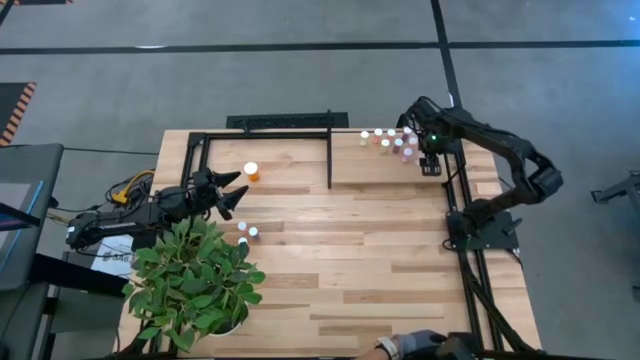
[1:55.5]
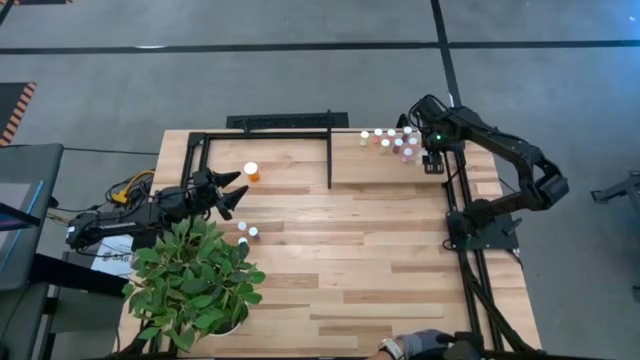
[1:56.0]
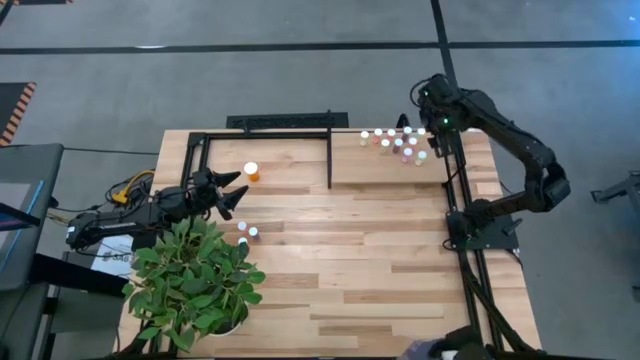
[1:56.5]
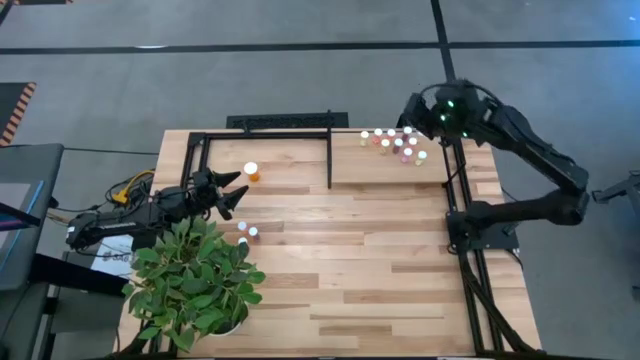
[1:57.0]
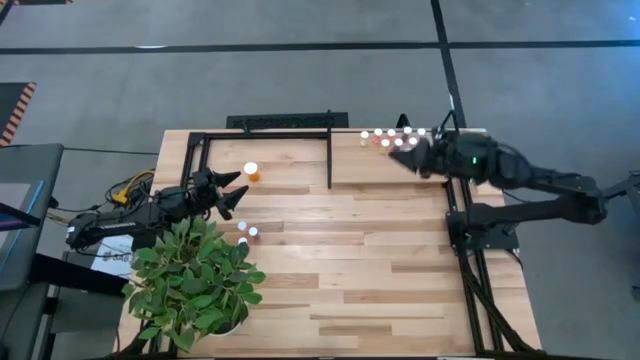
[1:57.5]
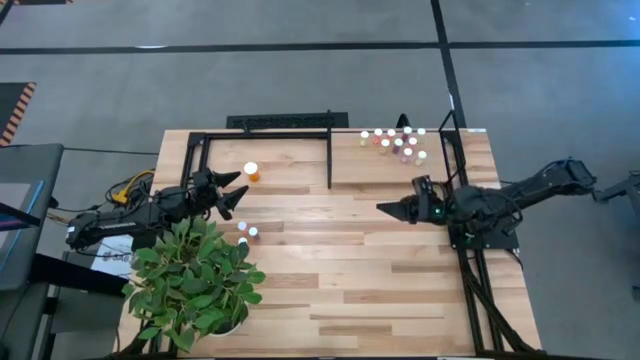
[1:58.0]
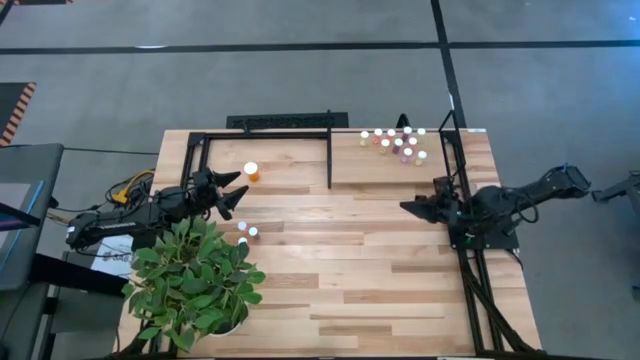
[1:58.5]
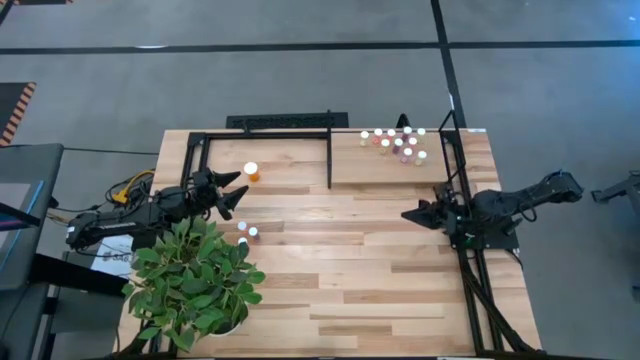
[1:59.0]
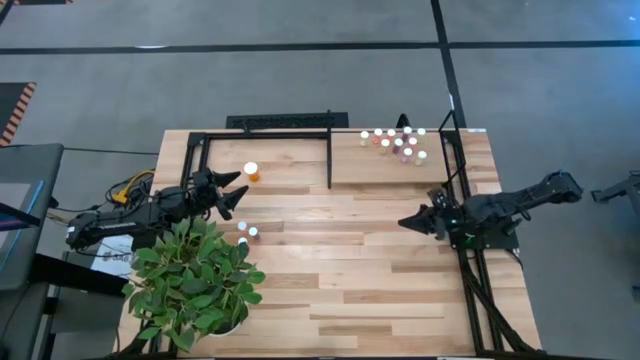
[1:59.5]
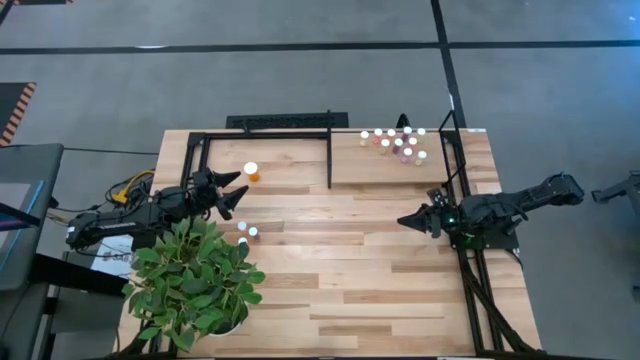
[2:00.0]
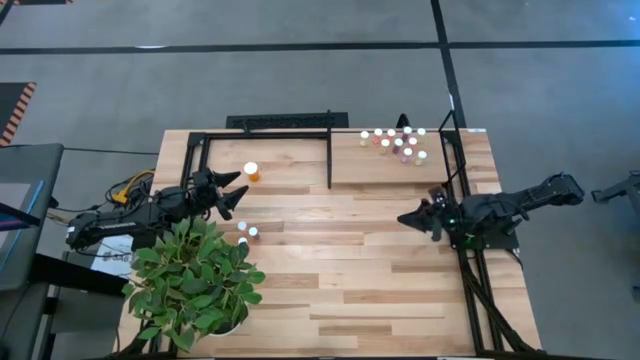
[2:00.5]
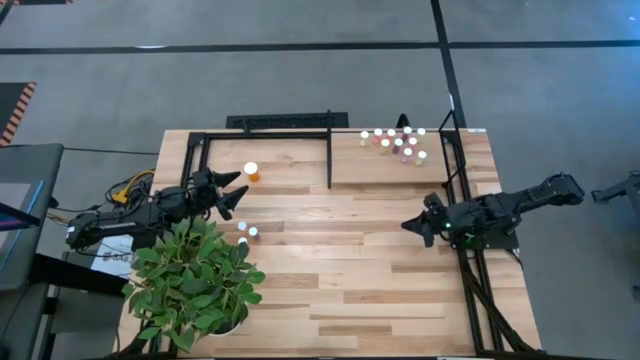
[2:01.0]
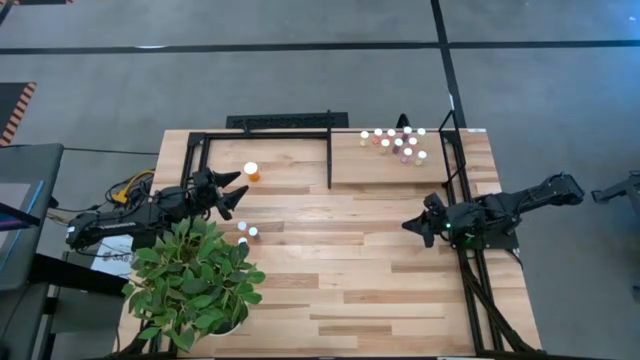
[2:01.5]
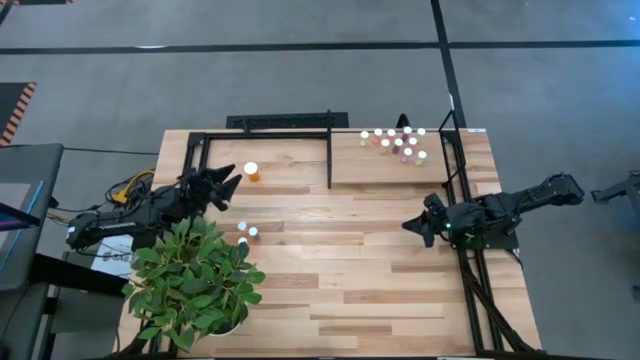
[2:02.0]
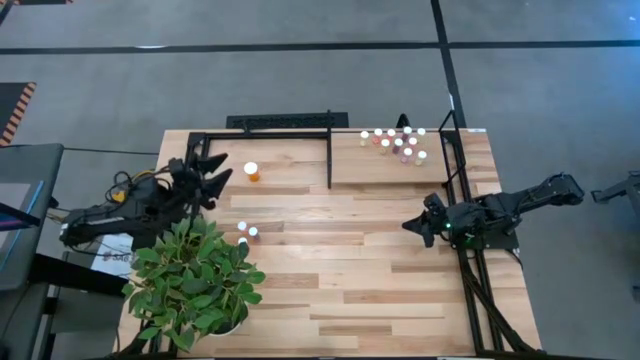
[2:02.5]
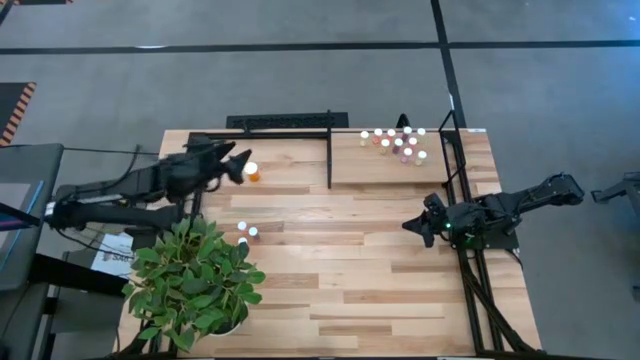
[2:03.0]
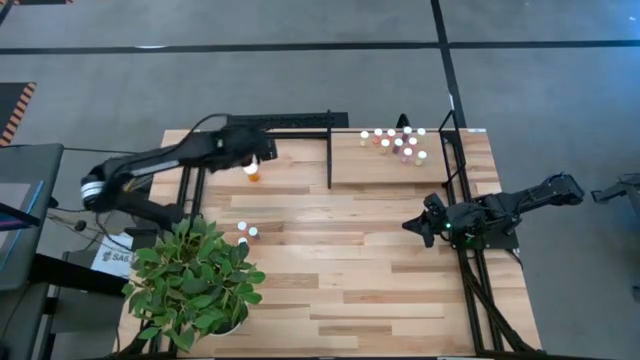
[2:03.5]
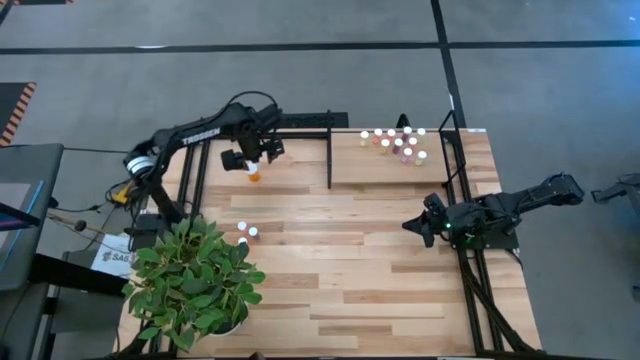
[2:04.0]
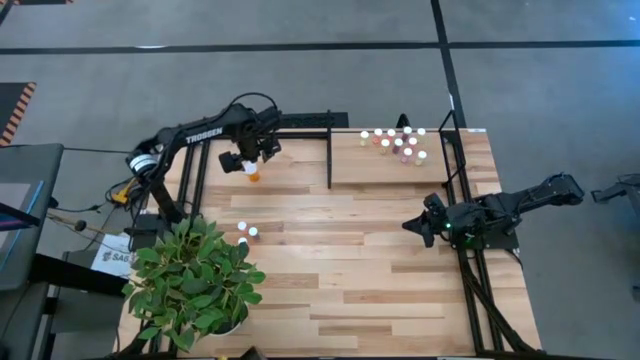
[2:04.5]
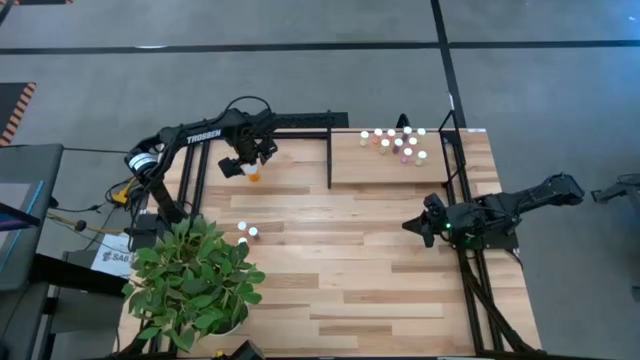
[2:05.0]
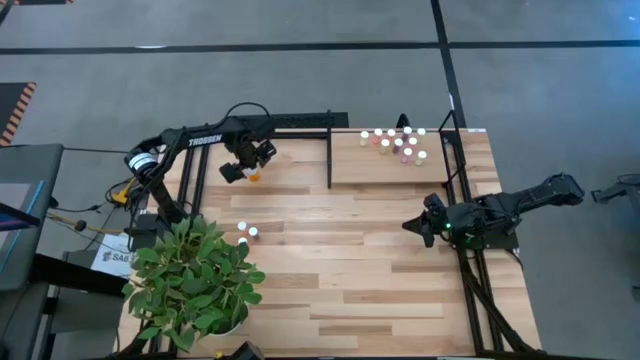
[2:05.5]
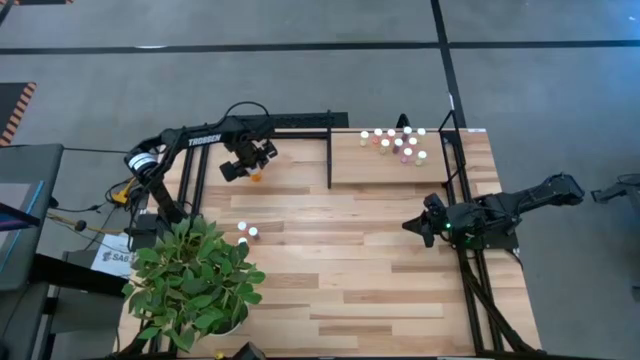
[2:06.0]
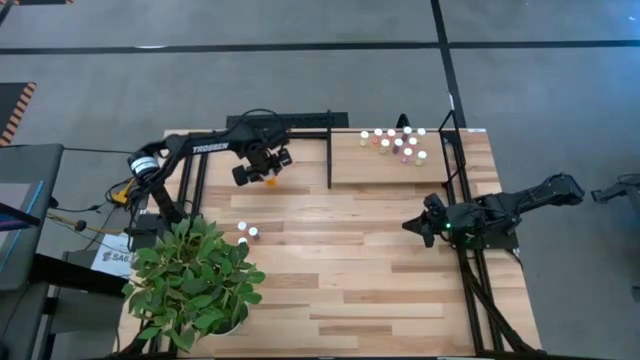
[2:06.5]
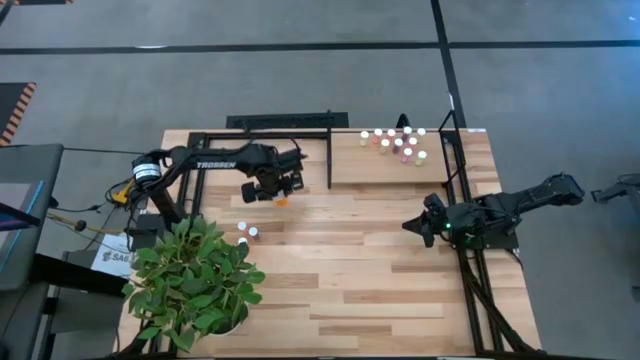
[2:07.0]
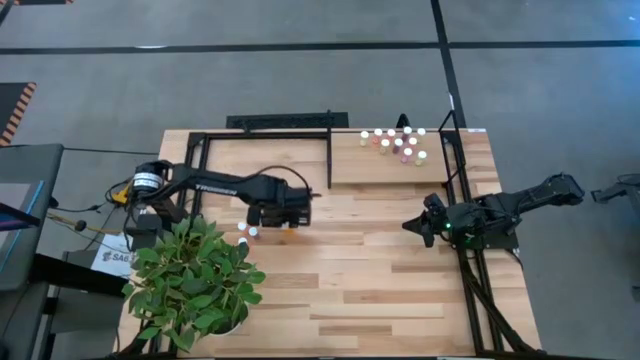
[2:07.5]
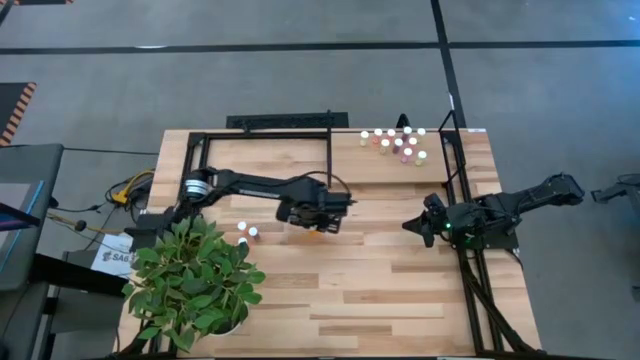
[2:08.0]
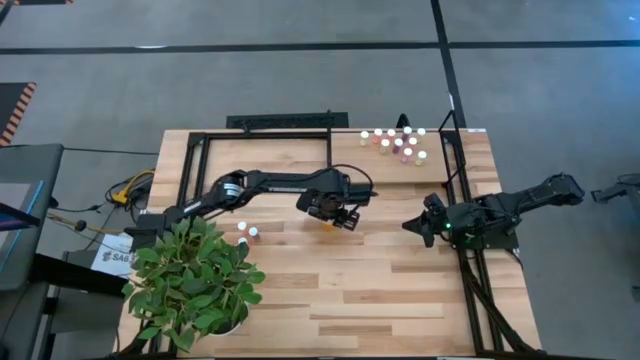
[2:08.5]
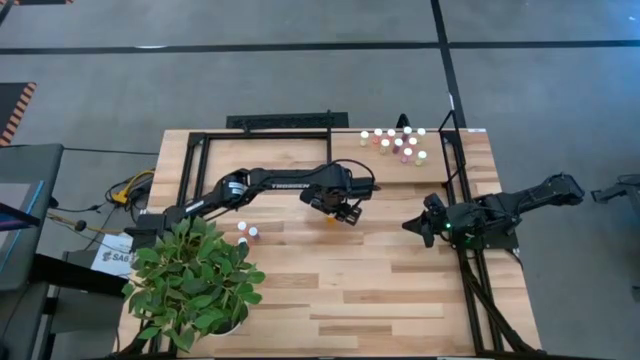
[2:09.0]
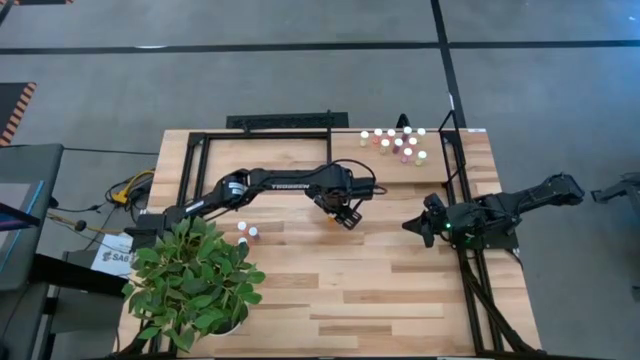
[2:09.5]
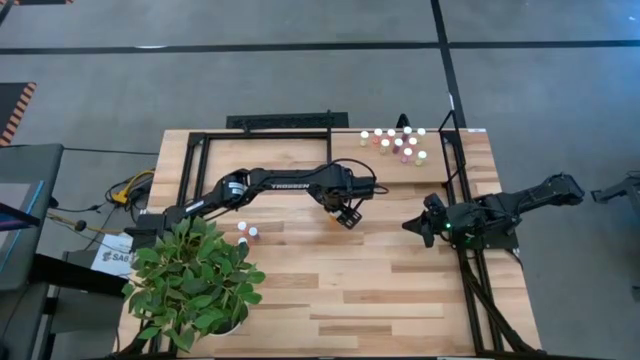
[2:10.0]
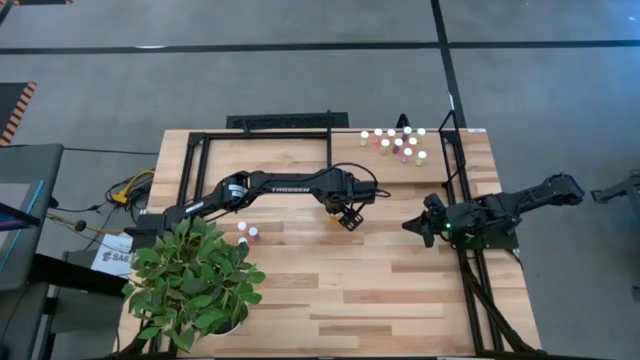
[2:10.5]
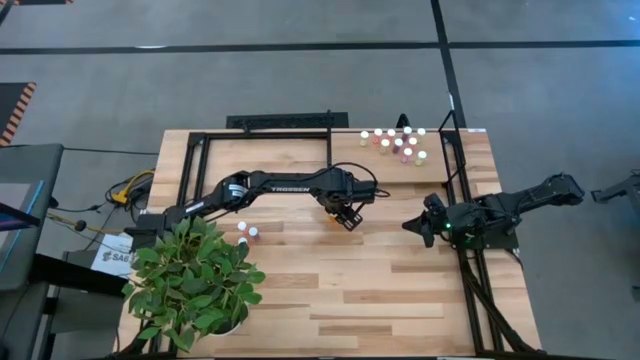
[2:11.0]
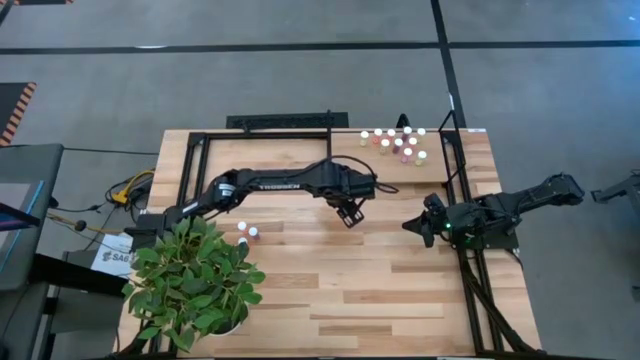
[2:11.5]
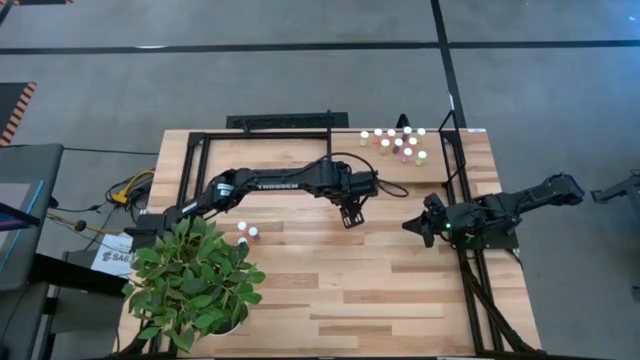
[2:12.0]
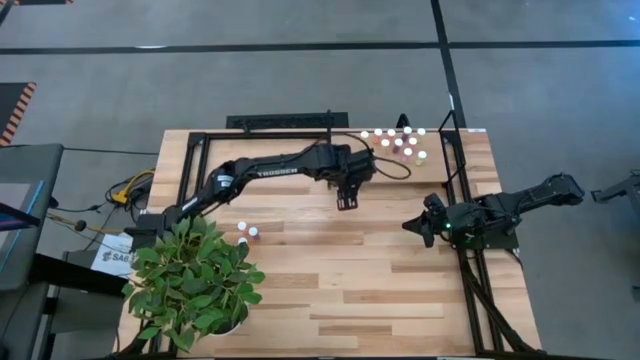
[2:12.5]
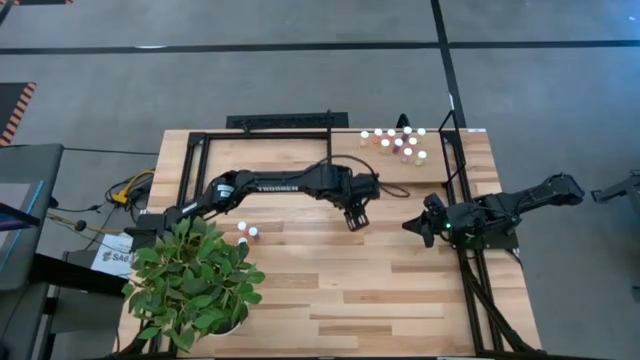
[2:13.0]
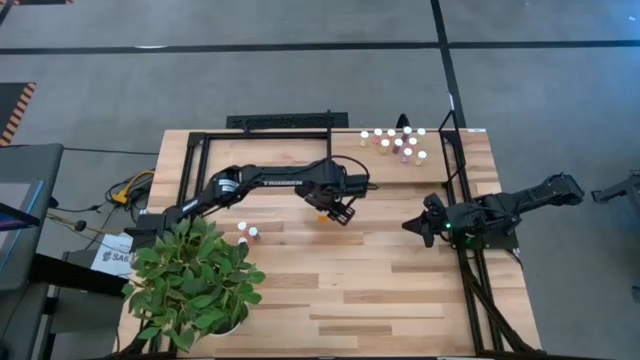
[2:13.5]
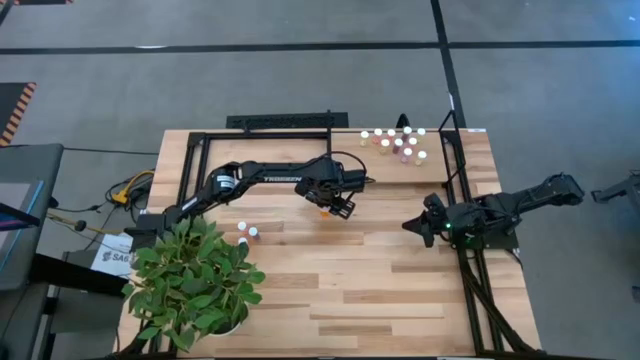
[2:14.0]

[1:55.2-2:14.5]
Task: Pick and place medicine bottles onto shelf by color
Move the orange pill bottle to the center of the table

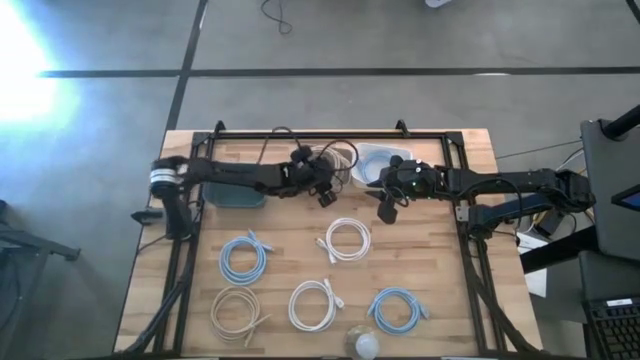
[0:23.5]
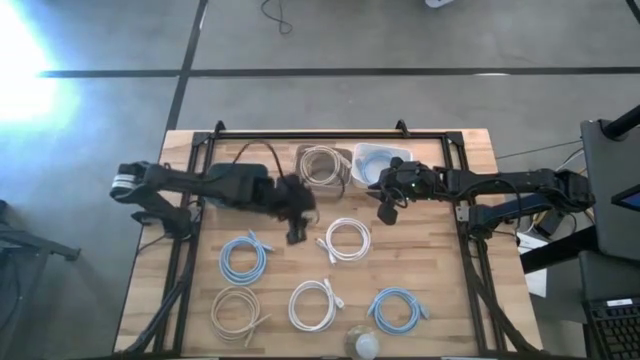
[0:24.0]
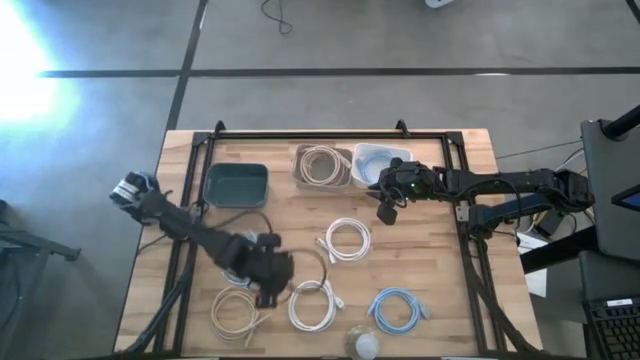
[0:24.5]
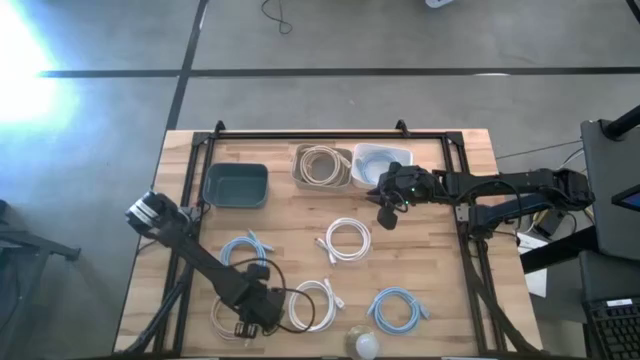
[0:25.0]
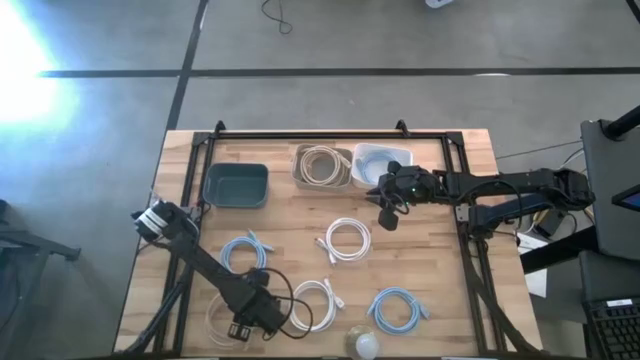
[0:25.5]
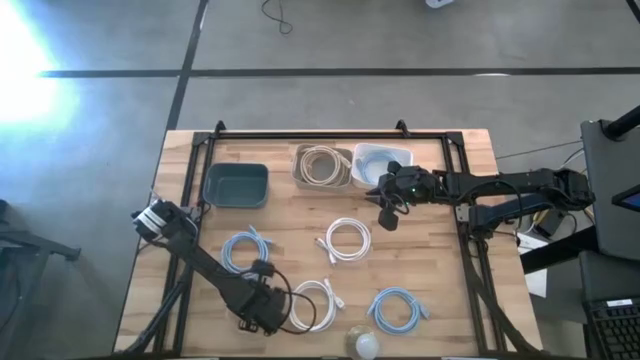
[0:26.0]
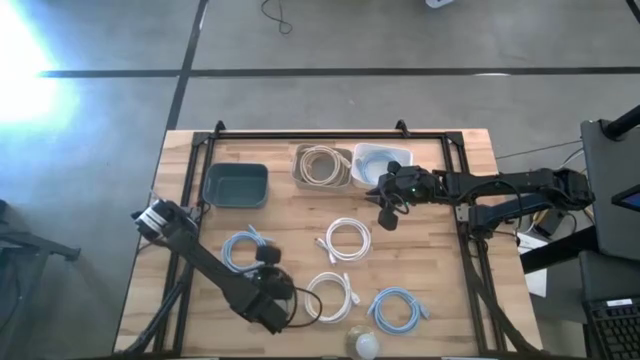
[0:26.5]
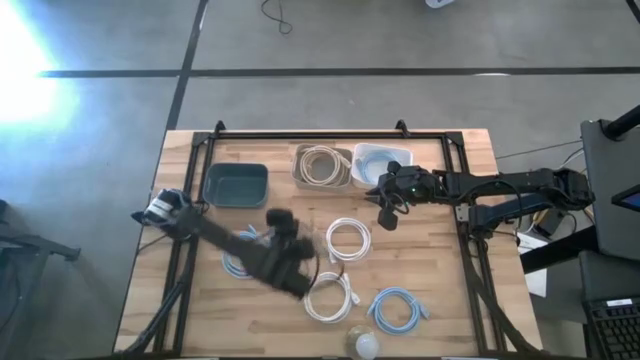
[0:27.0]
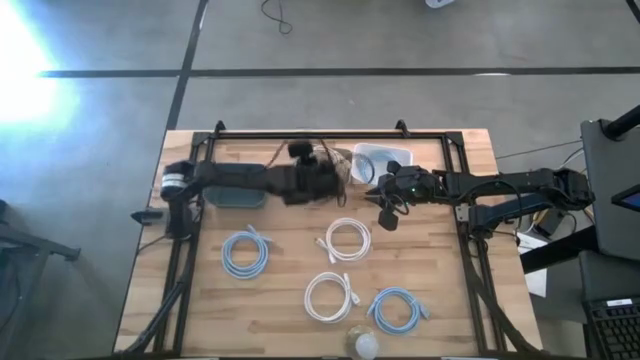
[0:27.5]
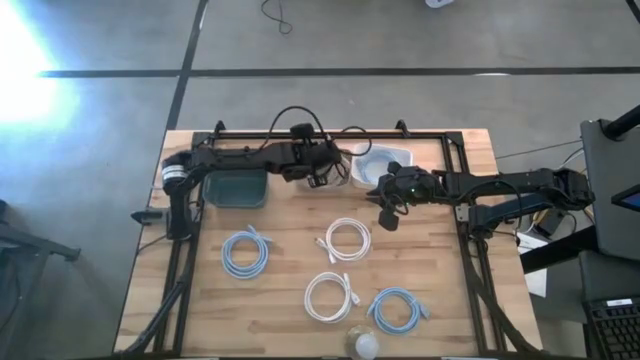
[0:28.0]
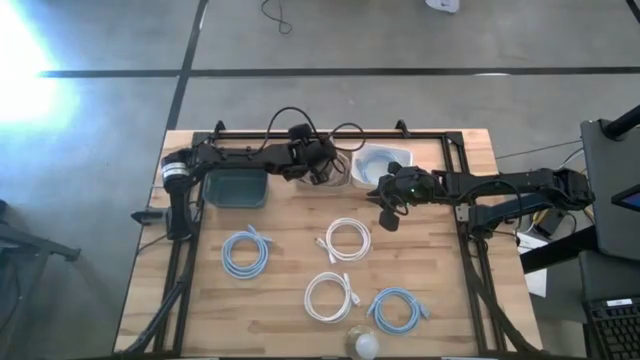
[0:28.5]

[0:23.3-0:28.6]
Task: Pick & Place USB Port
Put the brown USB cable into the gray bin
